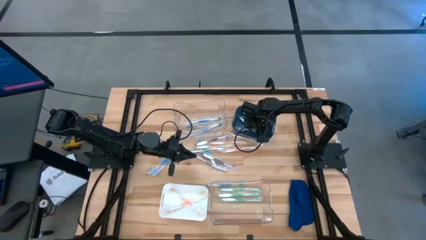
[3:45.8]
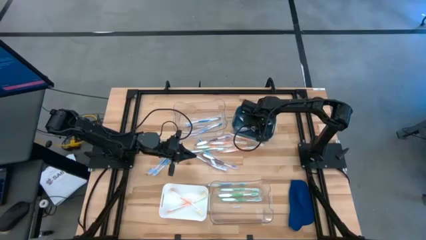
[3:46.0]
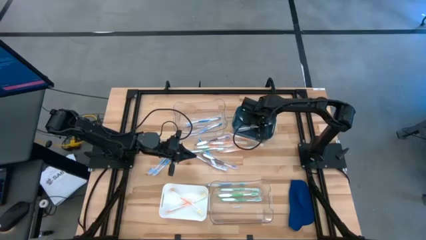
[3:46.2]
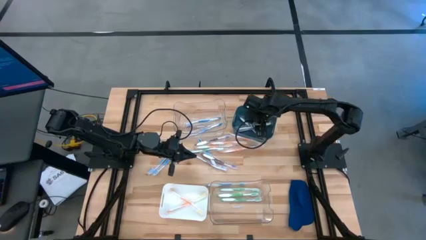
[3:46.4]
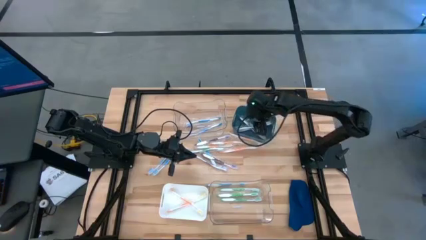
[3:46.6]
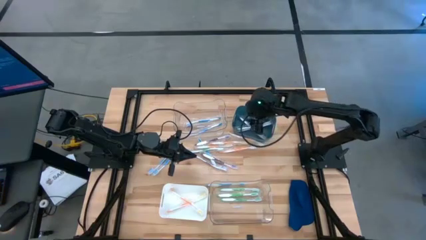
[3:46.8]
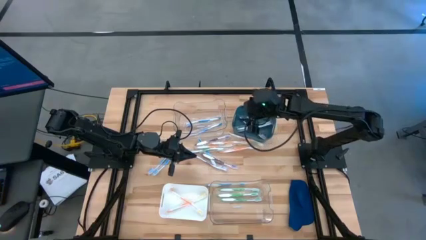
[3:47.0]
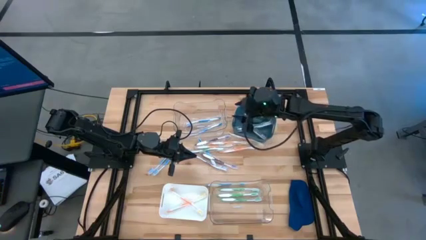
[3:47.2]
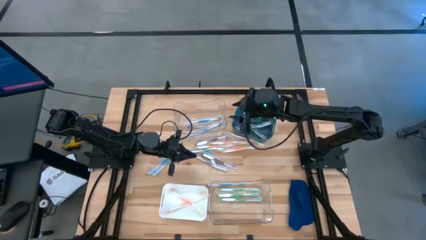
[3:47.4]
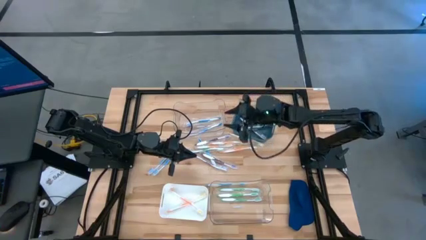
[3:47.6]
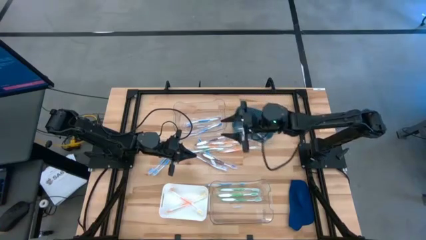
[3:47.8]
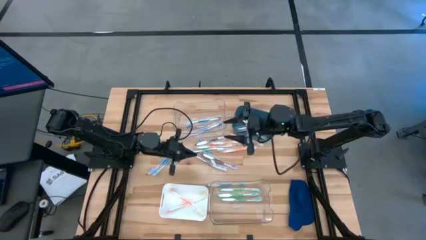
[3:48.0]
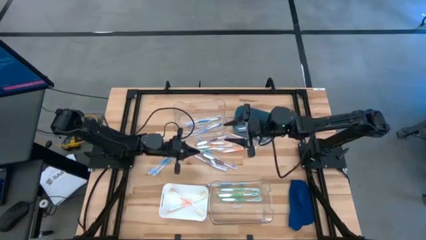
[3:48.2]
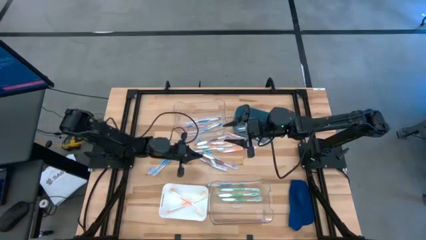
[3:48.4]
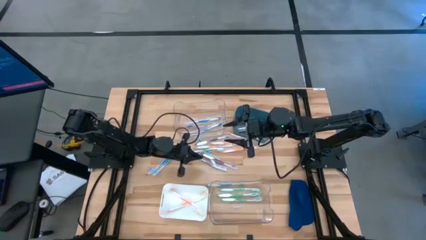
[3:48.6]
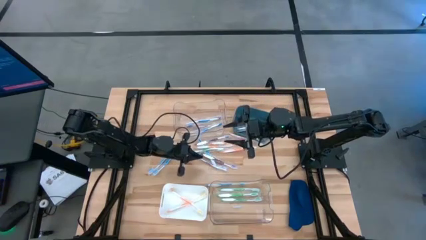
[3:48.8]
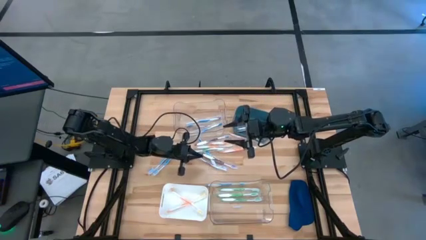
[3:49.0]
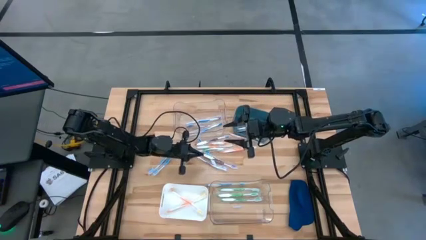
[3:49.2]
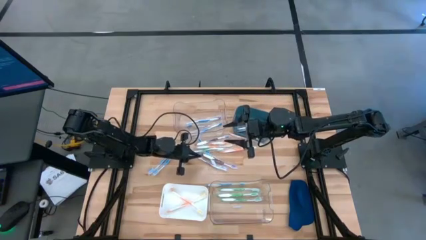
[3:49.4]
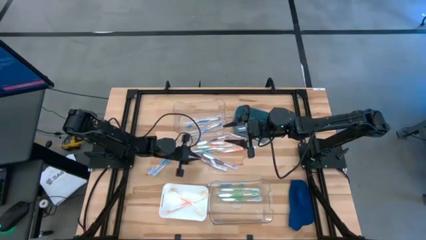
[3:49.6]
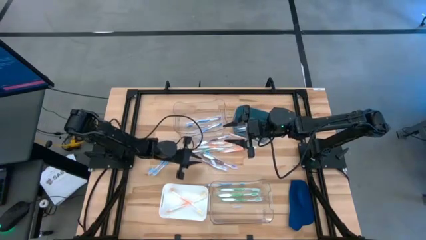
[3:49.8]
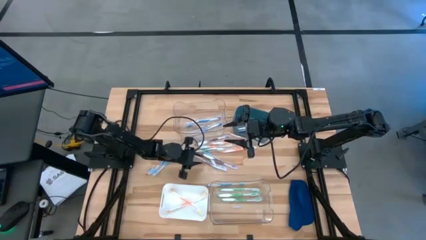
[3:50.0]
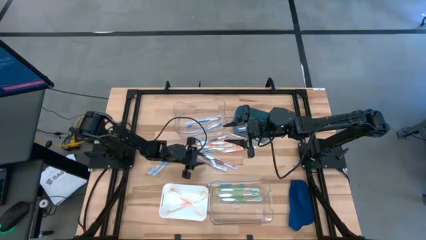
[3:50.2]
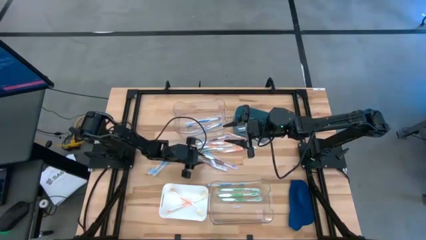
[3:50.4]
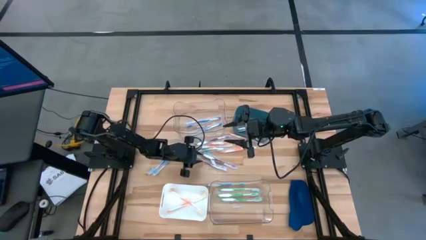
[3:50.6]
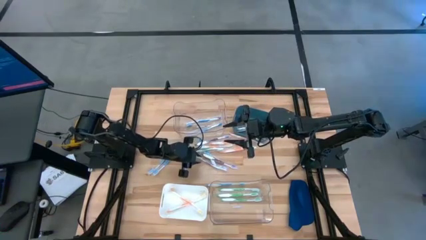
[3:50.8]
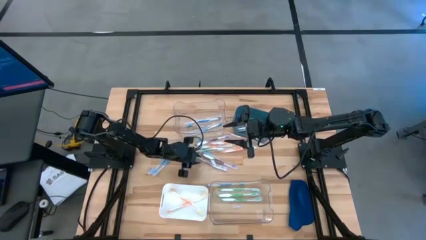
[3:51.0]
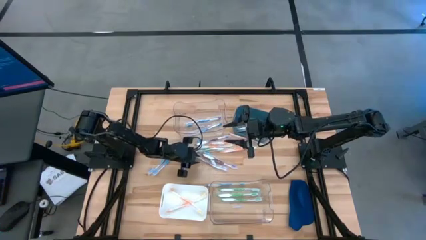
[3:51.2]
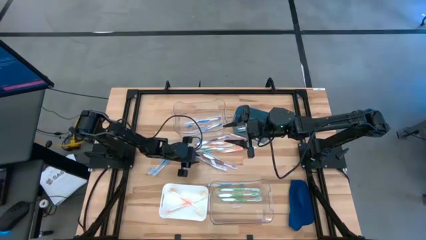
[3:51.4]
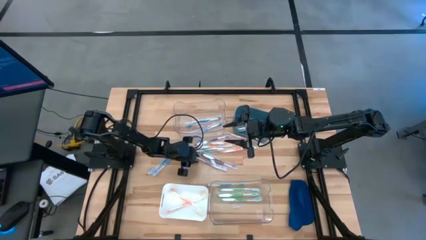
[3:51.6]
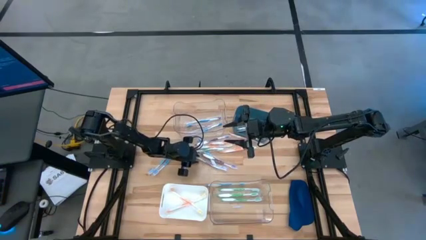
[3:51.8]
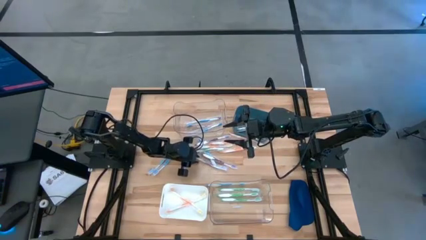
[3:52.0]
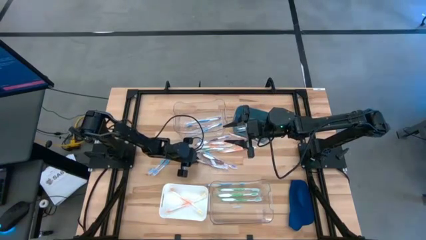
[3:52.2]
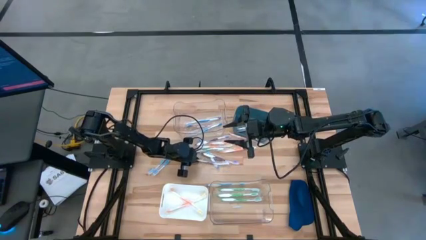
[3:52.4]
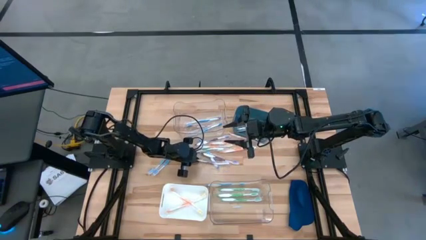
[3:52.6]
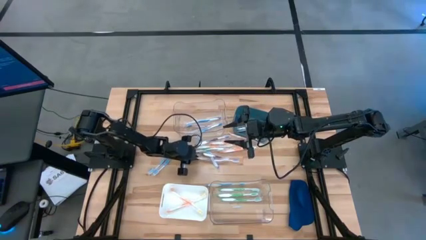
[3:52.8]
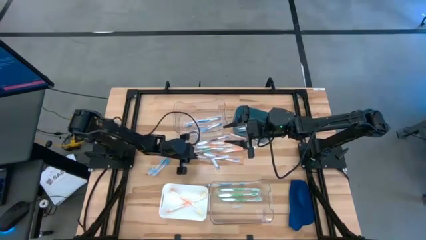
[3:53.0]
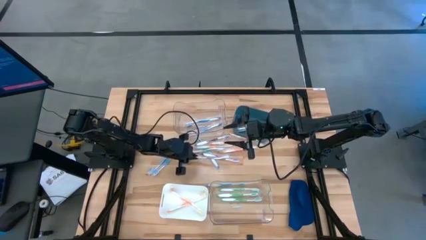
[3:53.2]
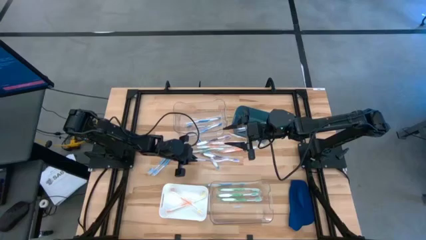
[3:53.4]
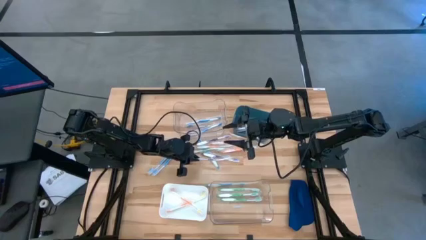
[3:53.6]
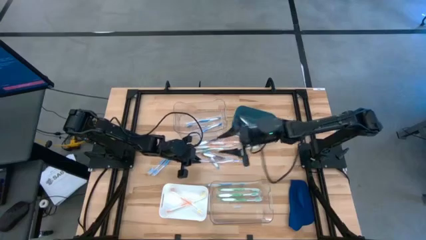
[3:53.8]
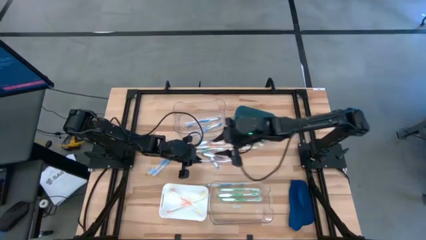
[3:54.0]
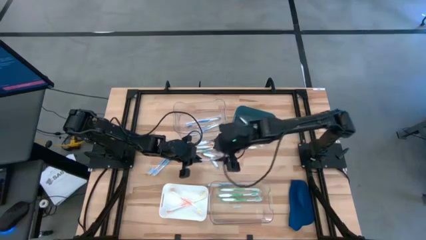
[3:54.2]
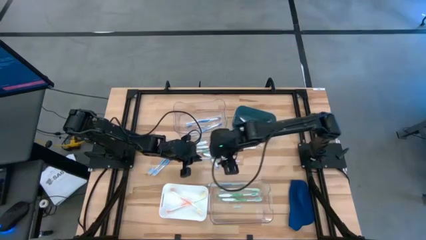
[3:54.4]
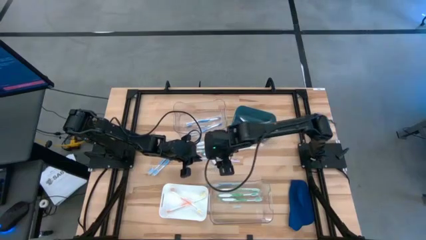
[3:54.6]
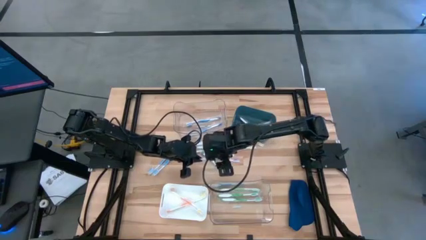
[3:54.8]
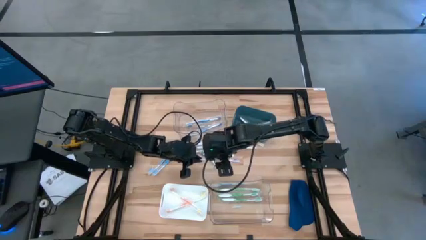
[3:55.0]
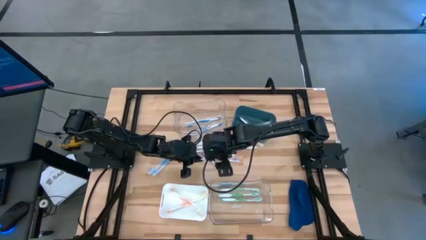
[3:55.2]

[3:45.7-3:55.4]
Task: Pick & Place Toothbrushes
Put the purple toothbrush into the green bin

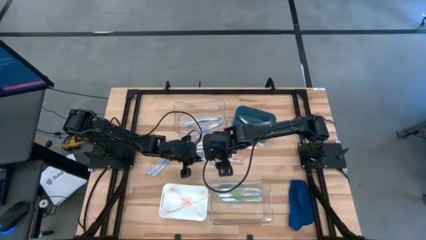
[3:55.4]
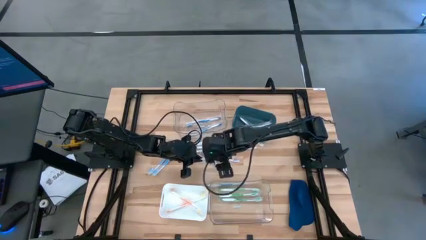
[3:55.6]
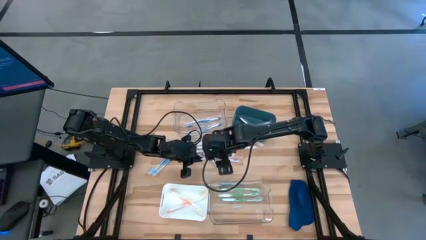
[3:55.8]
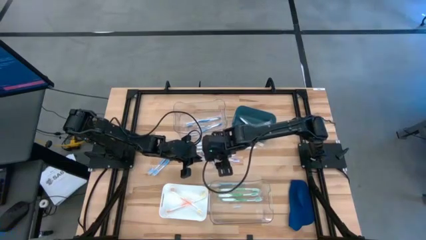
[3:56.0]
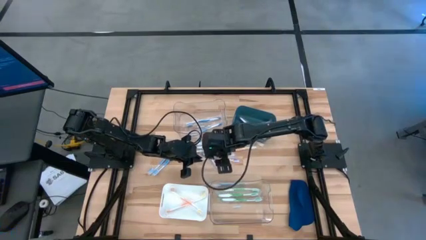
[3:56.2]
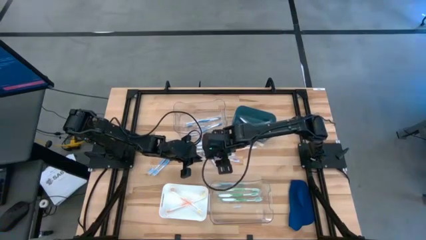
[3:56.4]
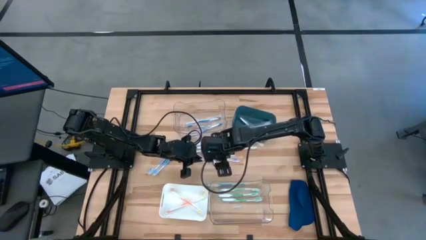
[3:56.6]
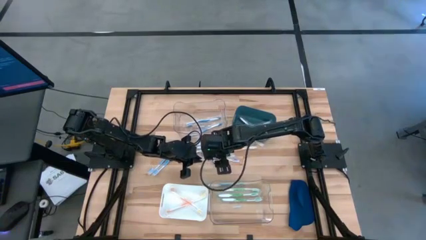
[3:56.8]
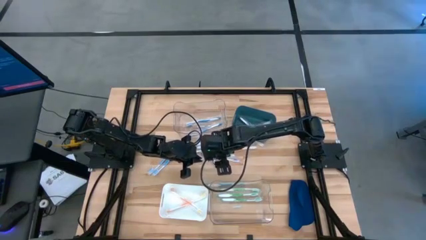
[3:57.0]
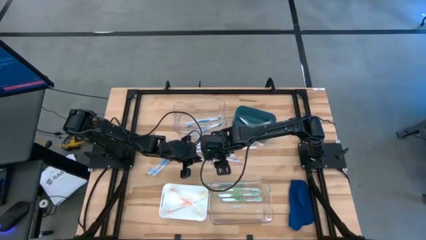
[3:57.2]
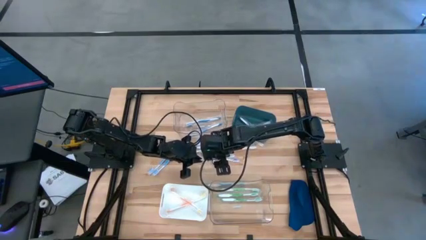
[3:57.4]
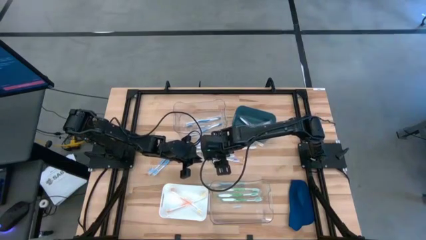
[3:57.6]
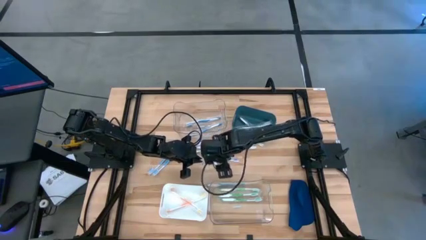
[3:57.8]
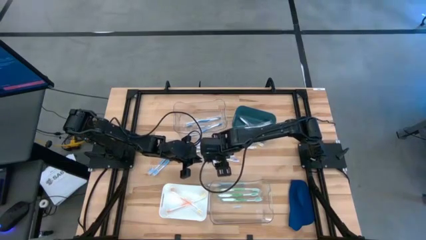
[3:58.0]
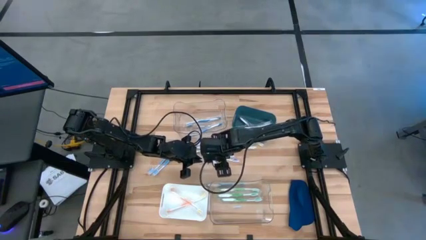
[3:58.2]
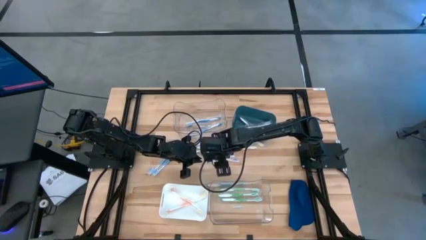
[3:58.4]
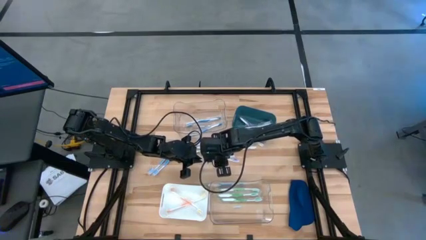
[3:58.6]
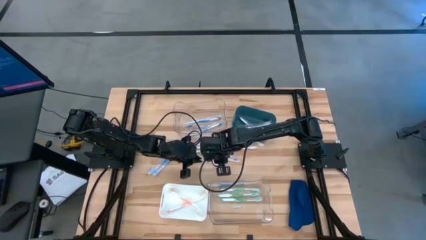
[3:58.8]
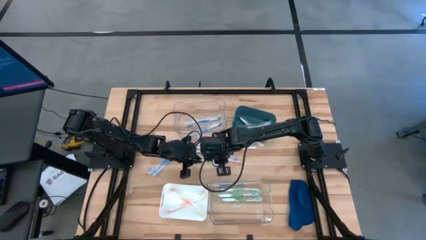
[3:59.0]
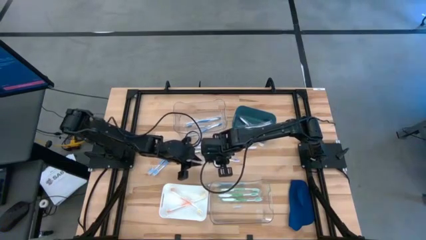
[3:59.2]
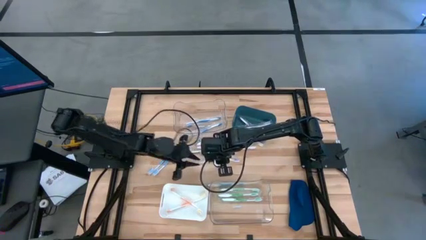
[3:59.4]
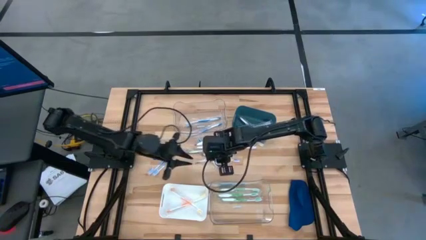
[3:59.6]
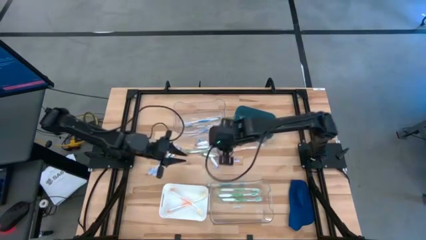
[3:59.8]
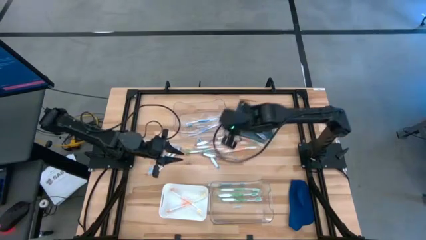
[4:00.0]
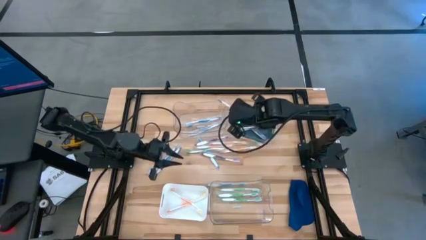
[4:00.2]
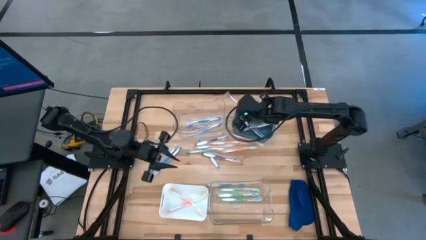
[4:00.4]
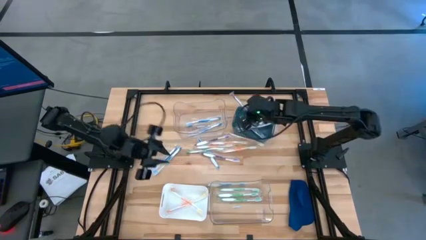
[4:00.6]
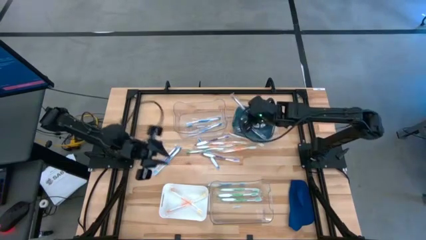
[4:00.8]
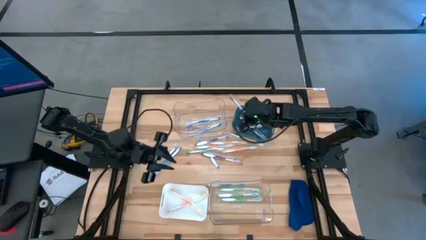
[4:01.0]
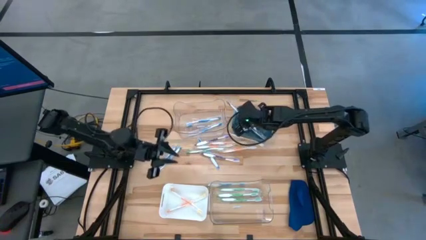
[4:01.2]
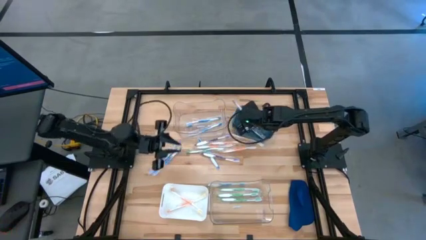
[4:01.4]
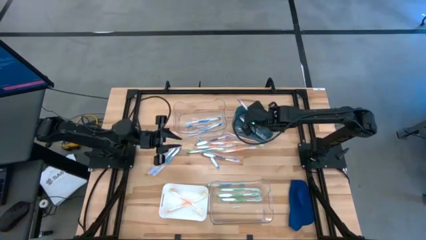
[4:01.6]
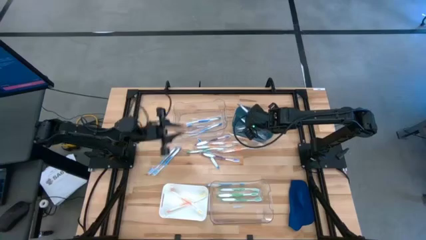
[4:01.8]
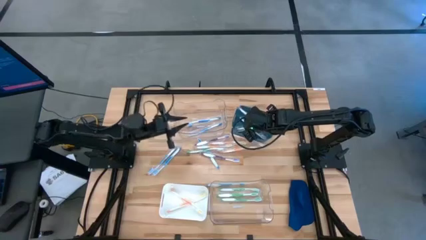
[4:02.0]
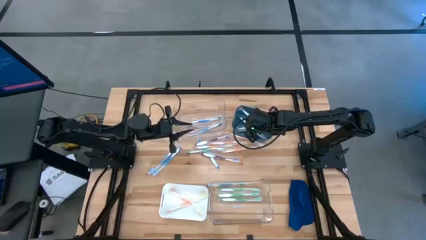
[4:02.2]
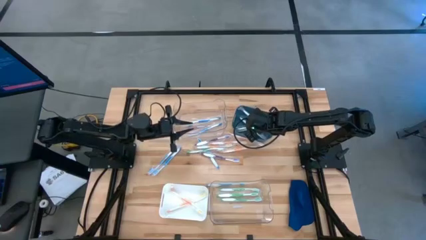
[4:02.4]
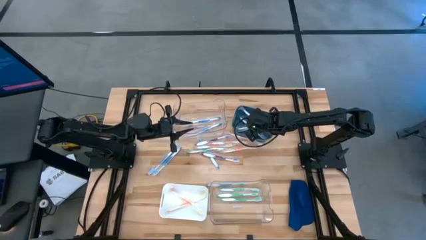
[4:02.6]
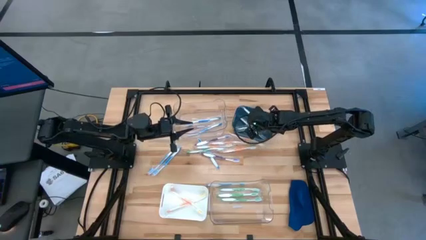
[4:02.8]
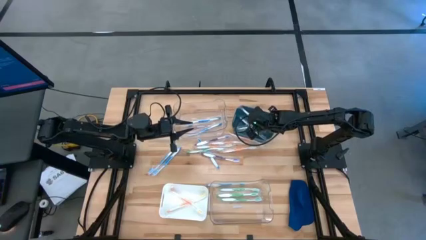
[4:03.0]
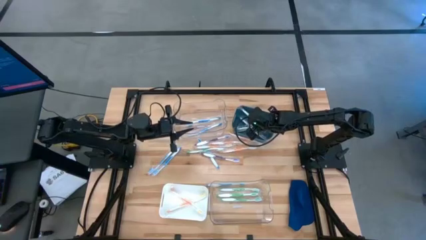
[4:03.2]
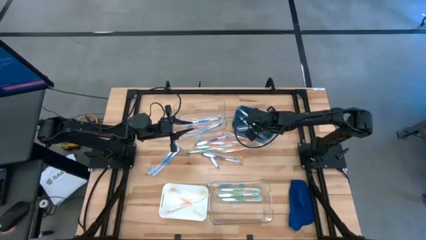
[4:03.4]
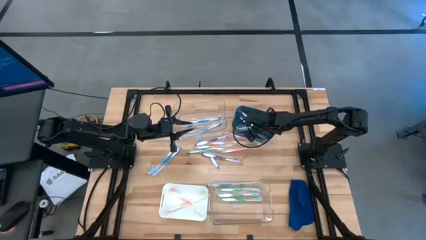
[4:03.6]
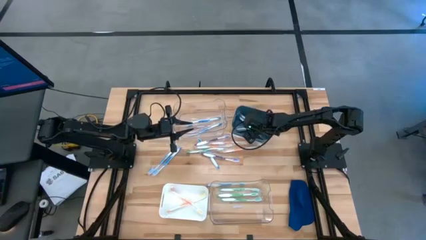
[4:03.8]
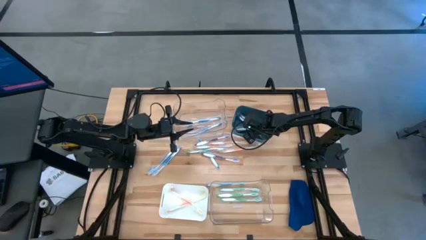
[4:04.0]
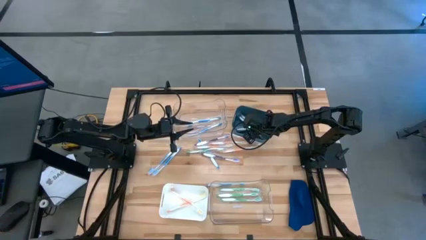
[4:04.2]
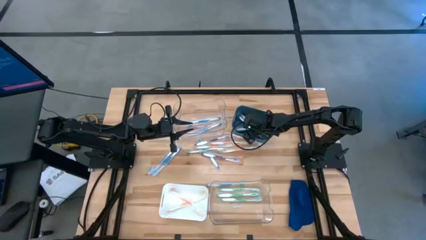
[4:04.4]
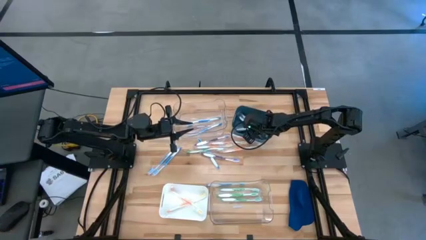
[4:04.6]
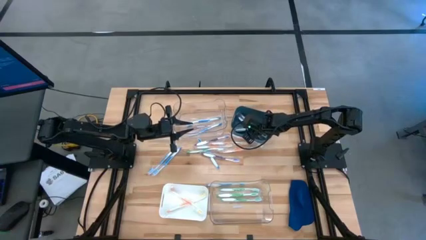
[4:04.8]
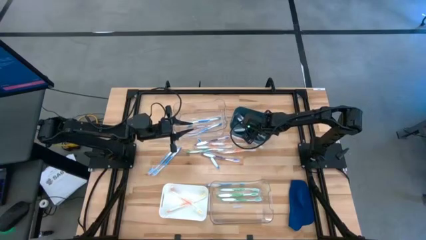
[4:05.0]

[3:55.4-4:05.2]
Put the purple toothbrush into the green bin
